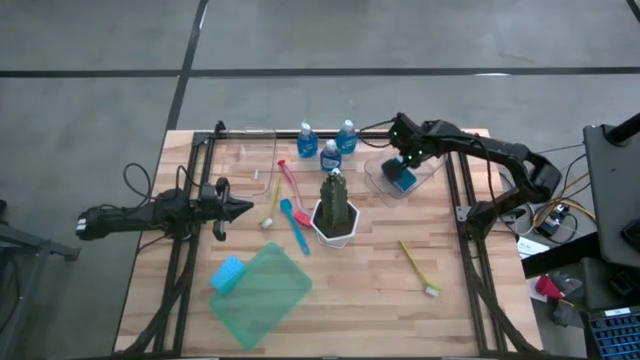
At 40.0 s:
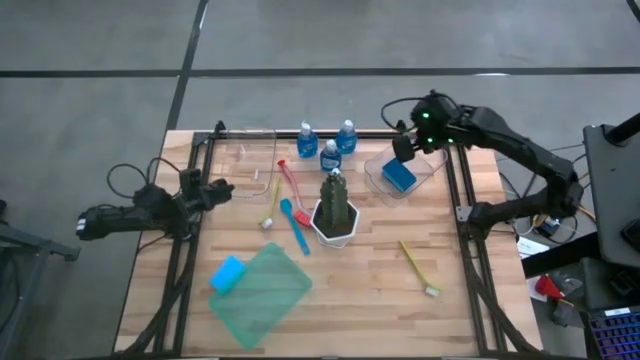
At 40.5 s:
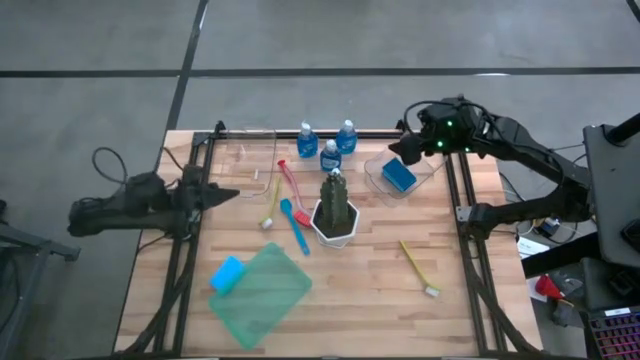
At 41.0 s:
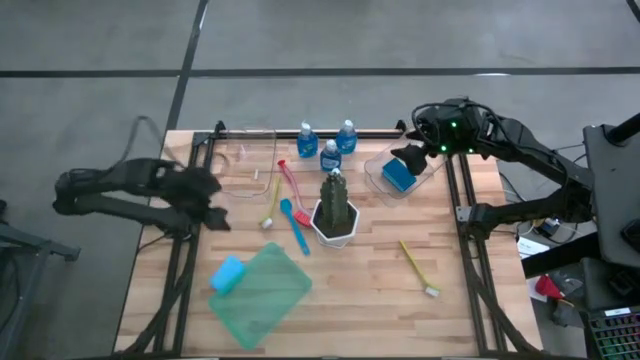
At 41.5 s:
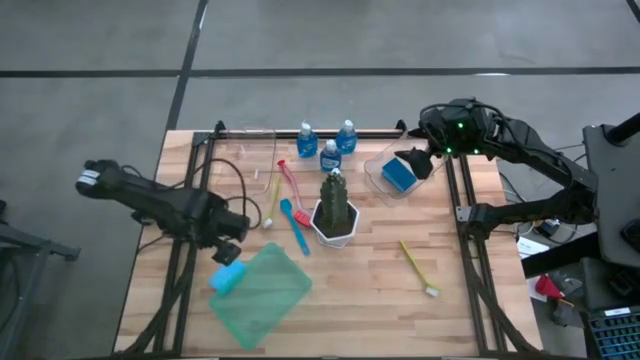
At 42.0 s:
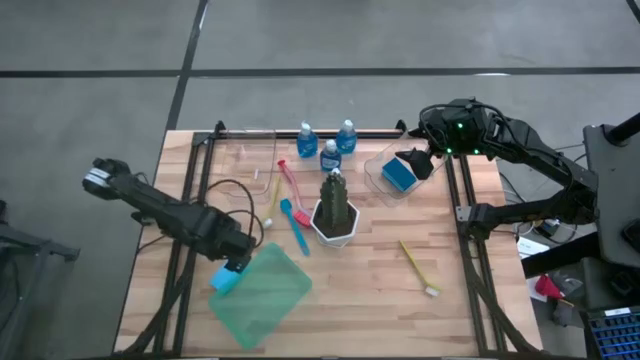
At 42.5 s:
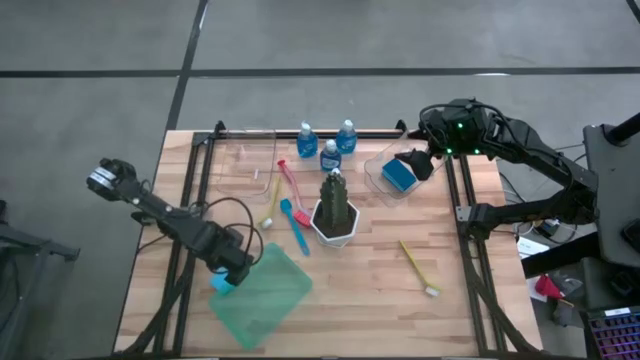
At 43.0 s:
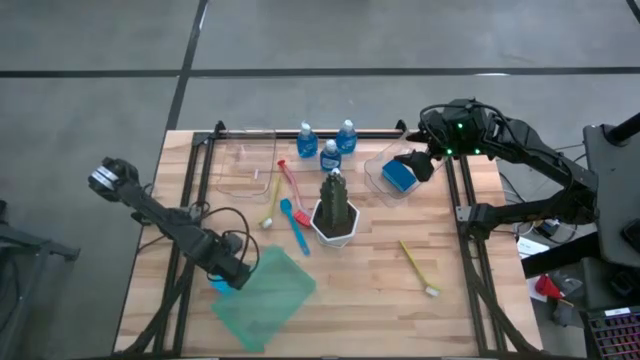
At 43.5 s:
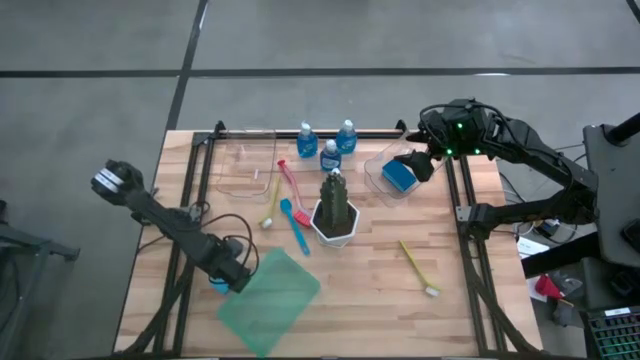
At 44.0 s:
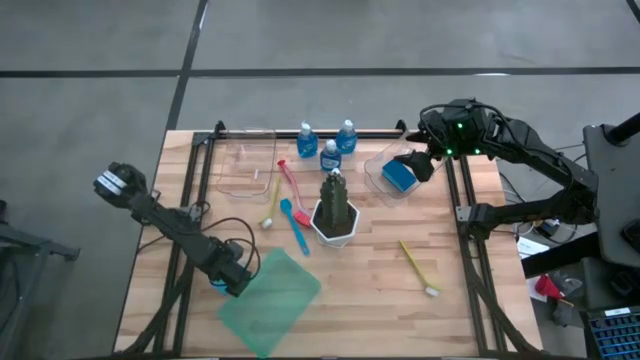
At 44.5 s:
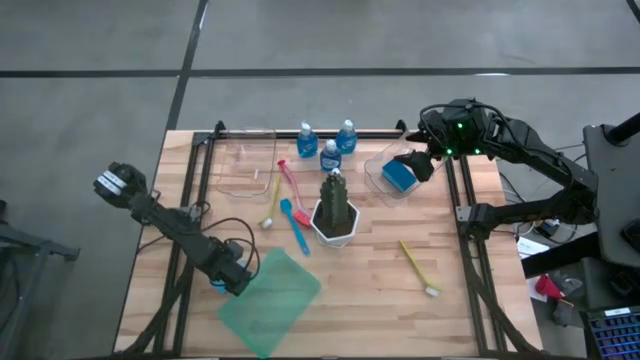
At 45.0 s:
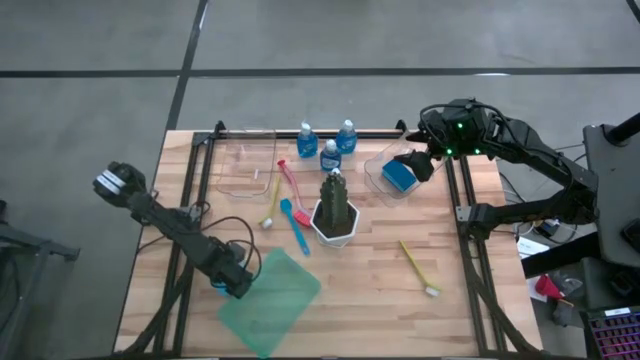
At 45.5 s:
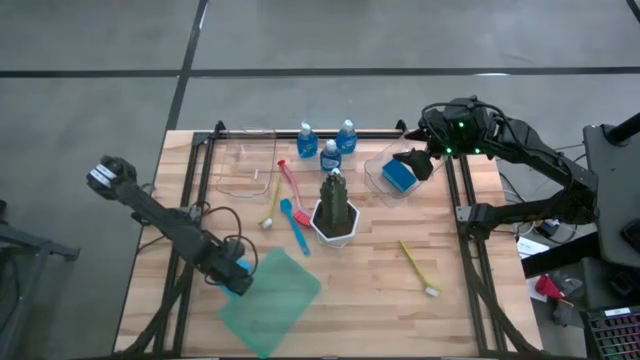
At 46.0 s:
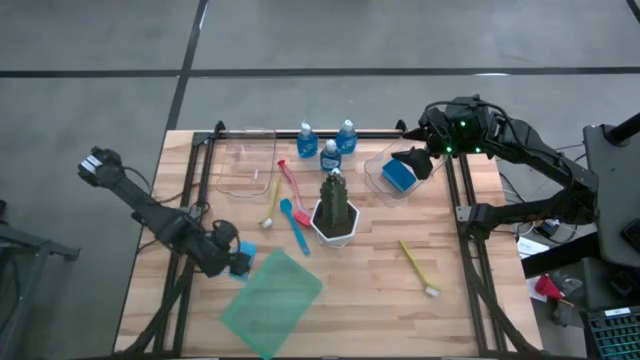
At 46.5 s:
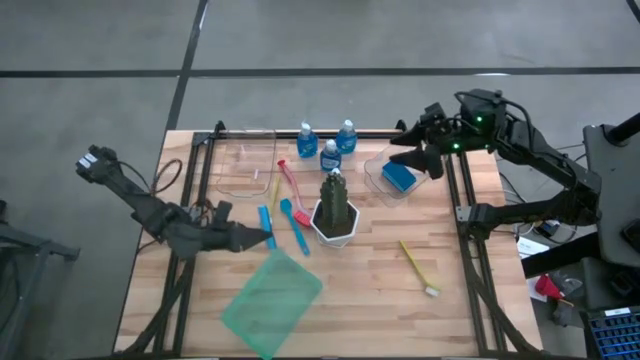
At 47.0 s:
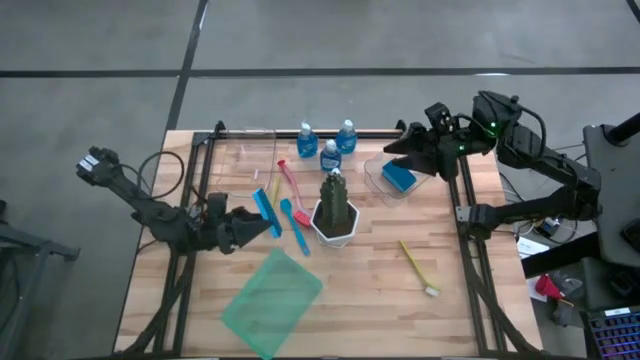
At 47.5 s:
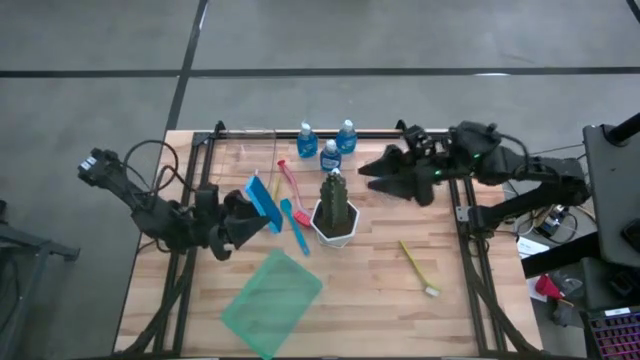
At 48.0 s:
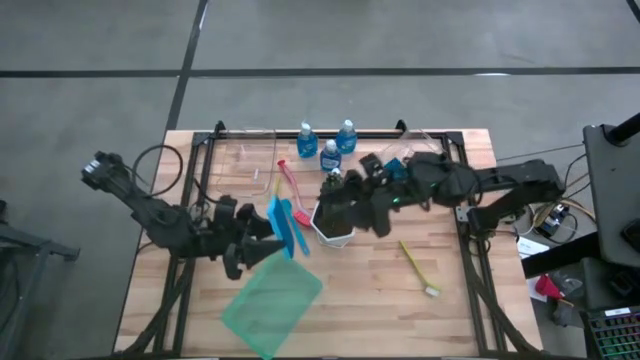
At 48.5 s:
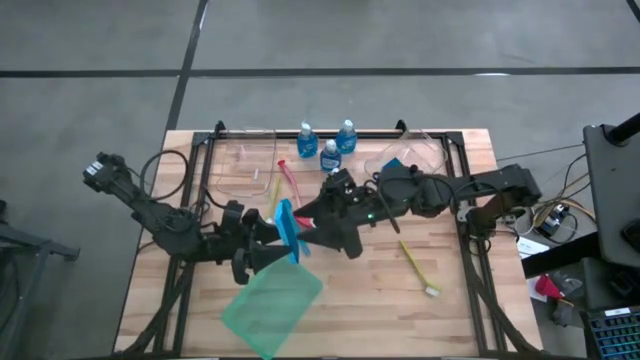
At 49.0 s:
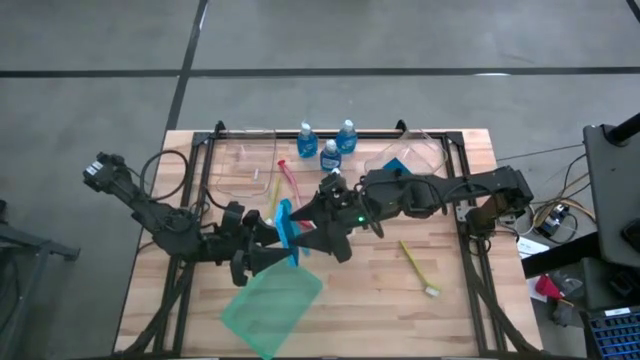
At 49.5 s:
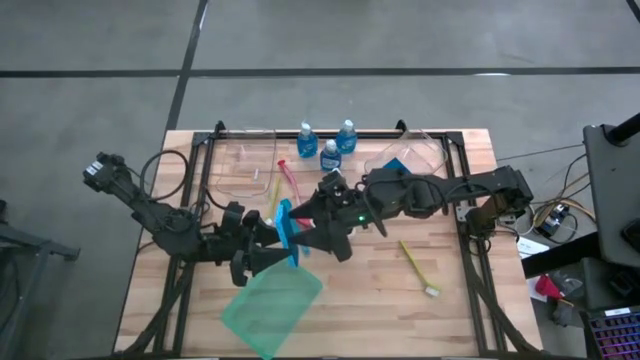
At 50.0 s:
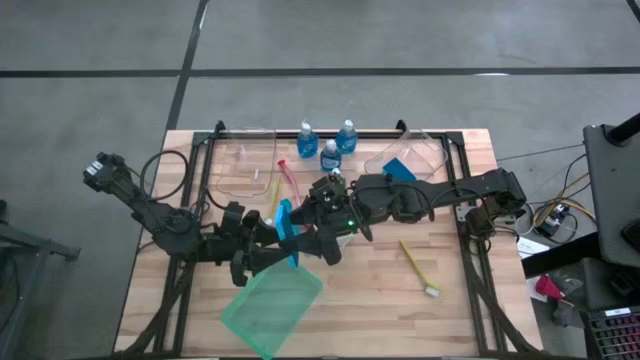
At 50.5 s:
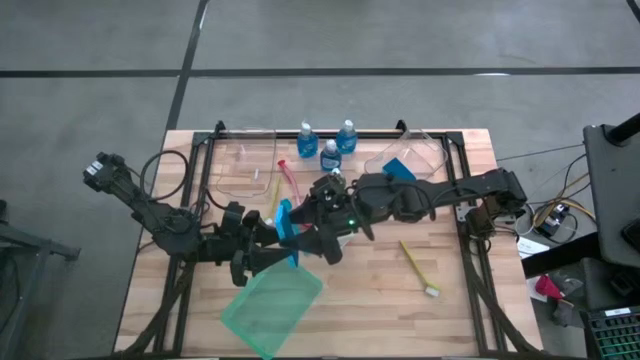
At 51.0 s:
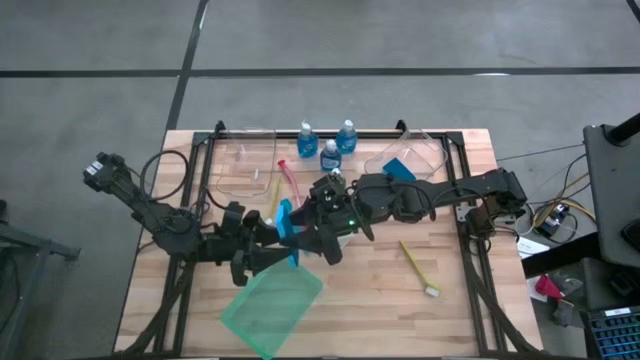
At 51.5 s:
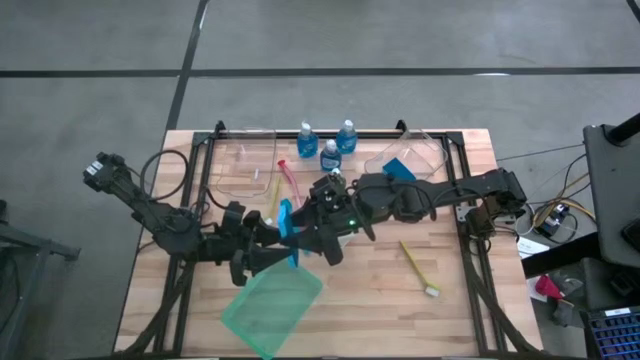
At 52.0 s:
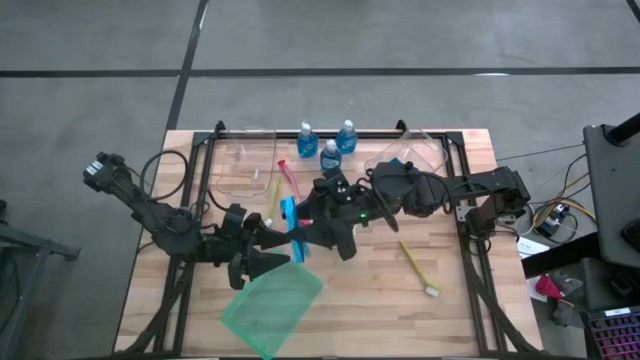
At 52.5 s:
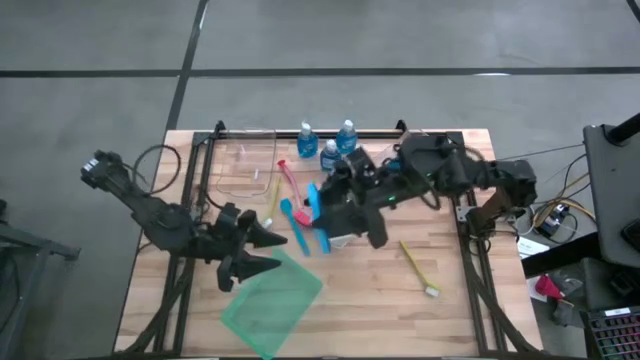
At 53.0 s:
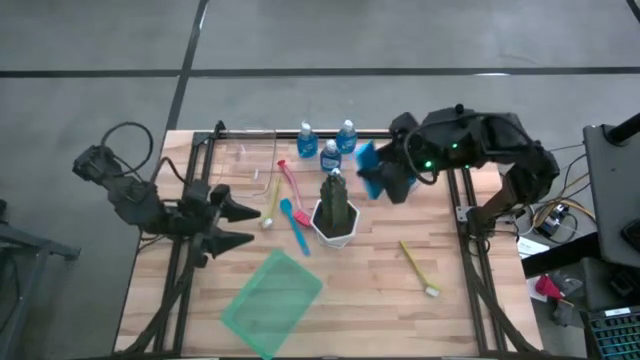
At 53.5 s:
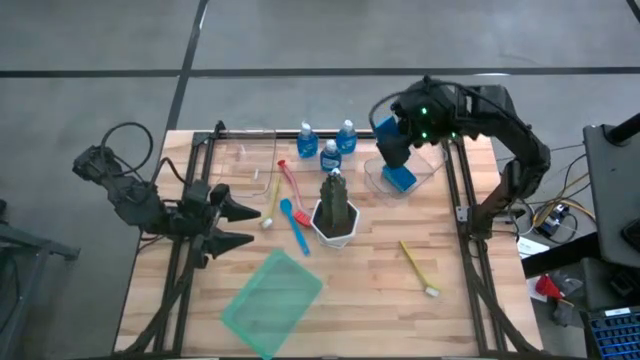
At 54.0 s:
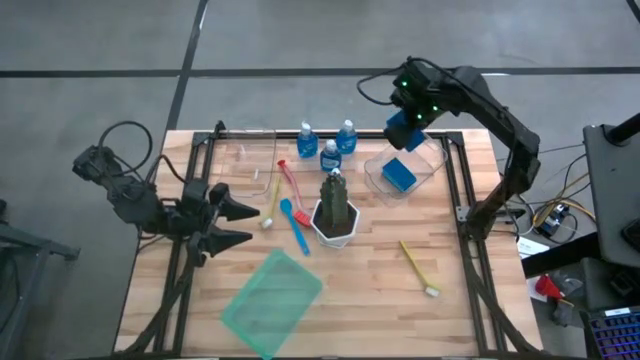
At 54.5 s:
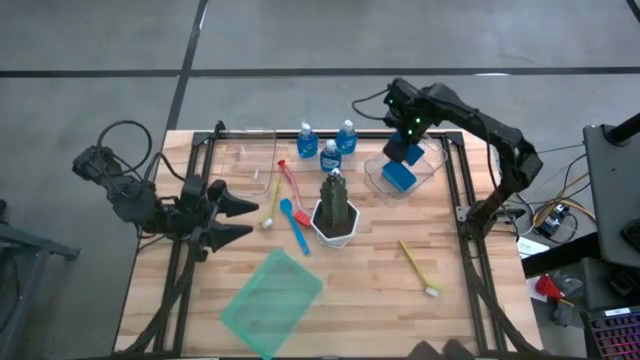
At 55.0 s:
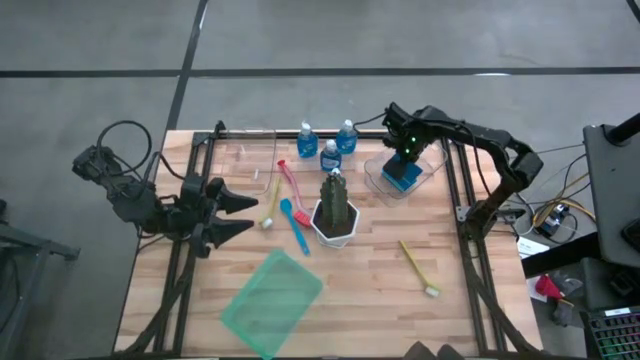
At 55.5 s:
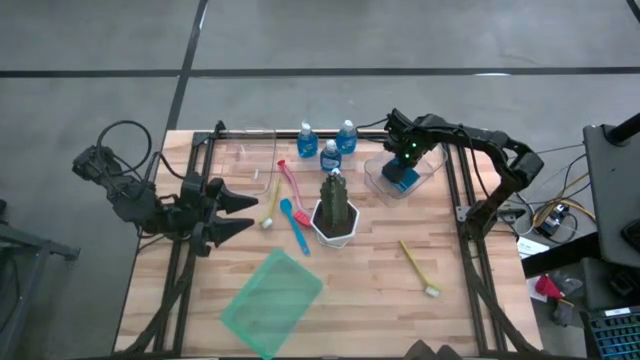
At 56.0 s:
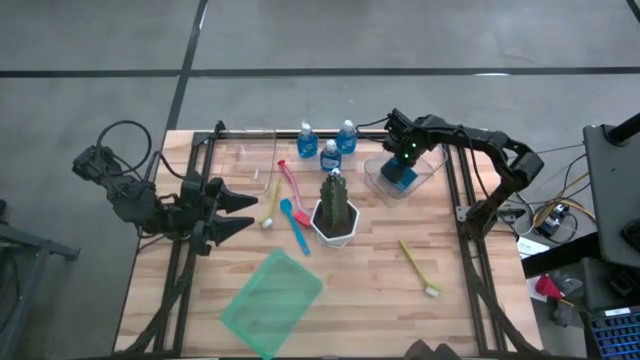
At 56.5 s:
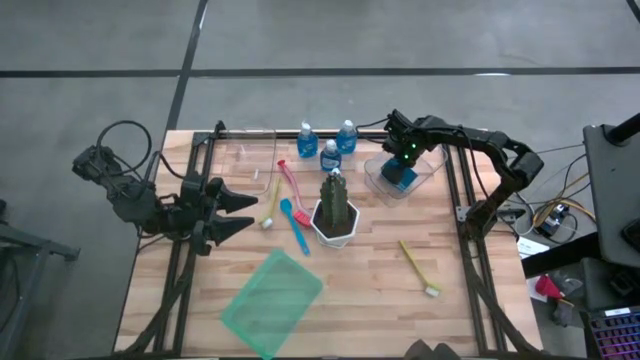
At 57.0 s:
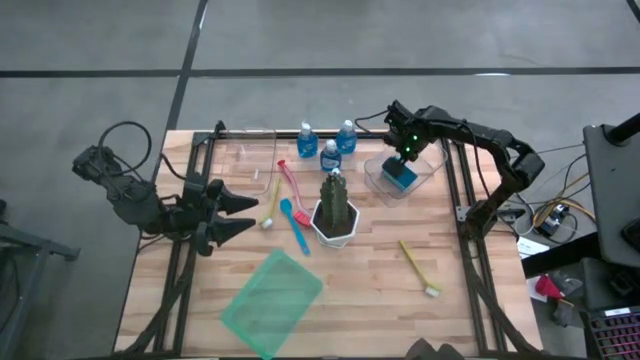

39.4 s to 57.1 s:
Task: Pick & Place Kitchen Sink Supplies
Put the blue sponge into the right transparent bin

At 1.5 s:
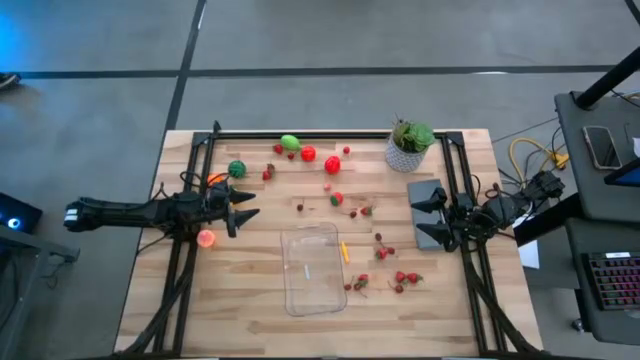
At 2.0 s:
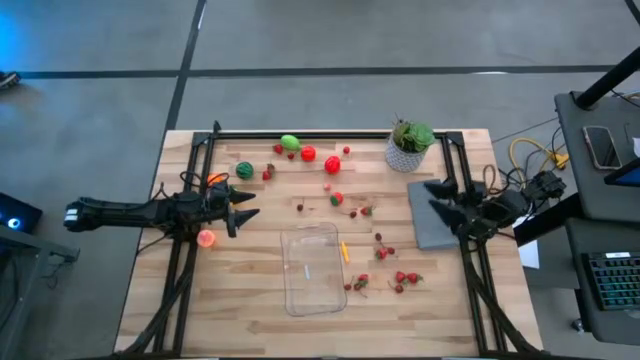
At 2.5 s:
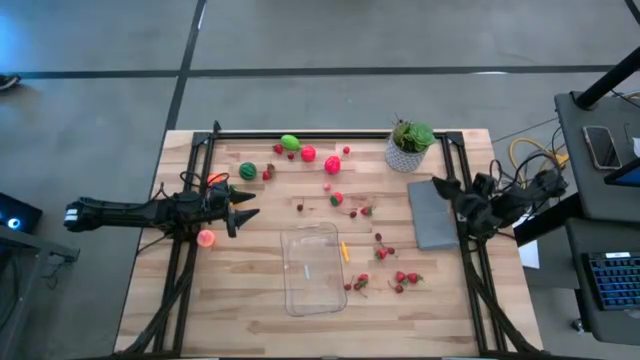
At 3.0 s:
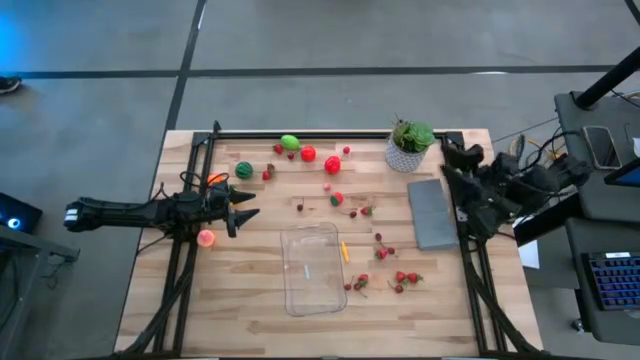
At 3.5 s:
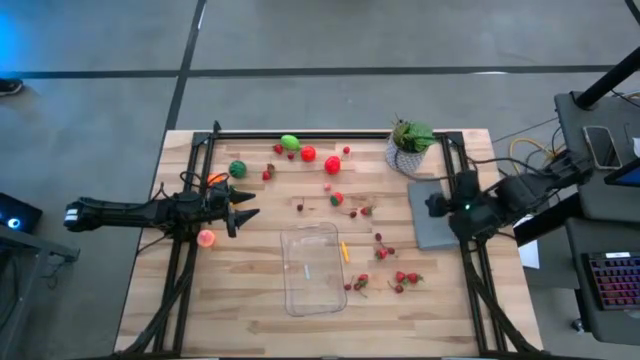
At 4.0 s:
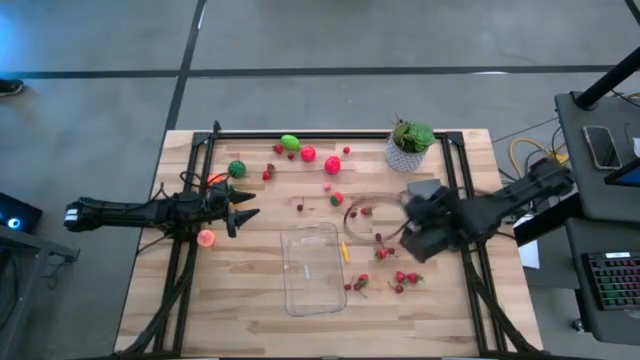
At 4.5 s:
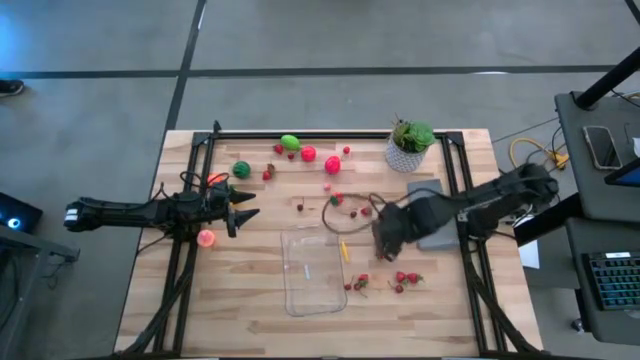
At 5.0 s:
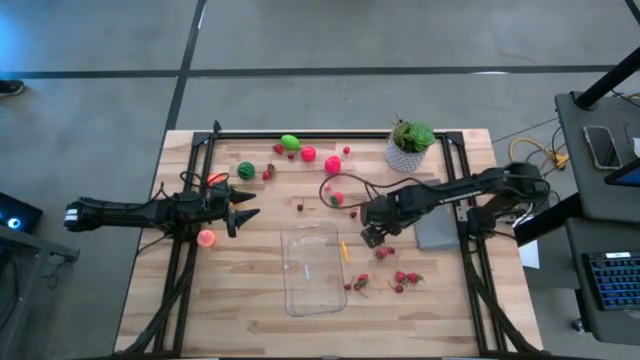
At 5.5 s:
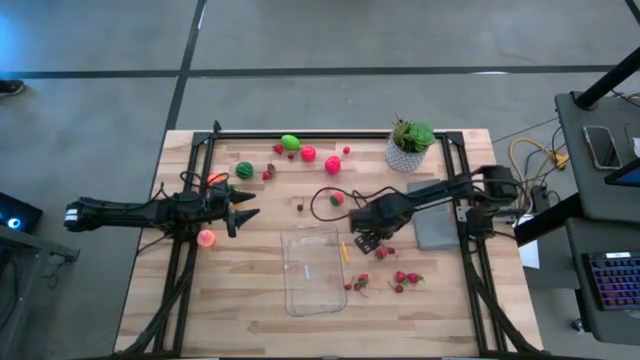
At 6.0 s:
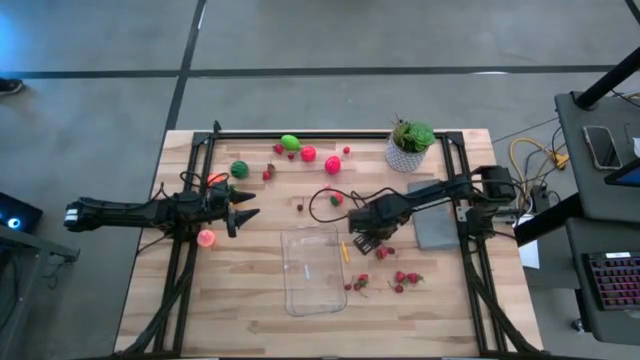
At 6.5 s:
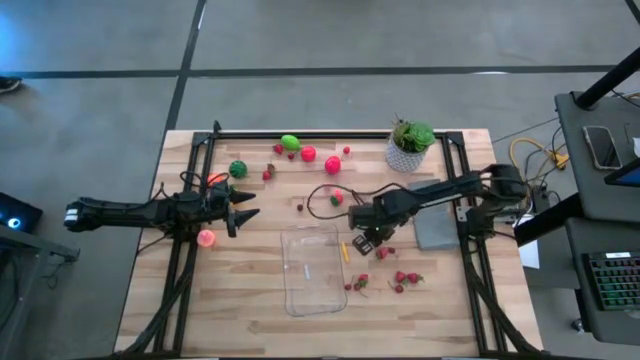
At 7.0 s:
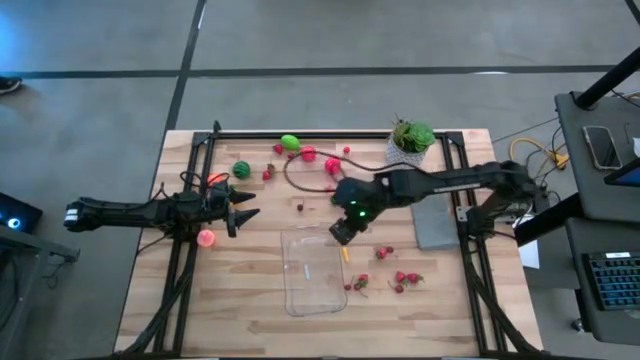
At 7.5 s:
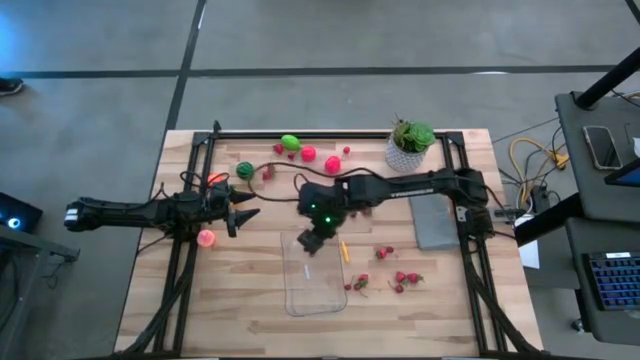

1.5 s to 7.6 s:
Task: Pick and placing Produce into tupperware
Put the red cherry into the transparent bin
